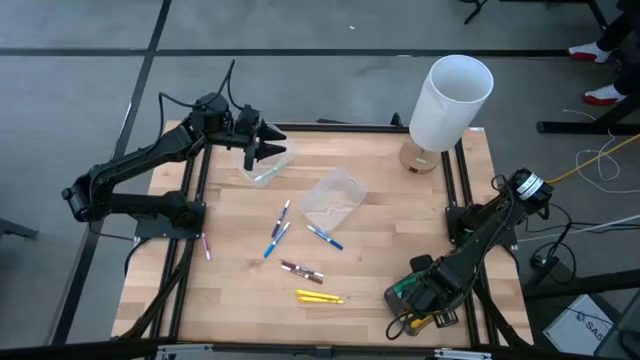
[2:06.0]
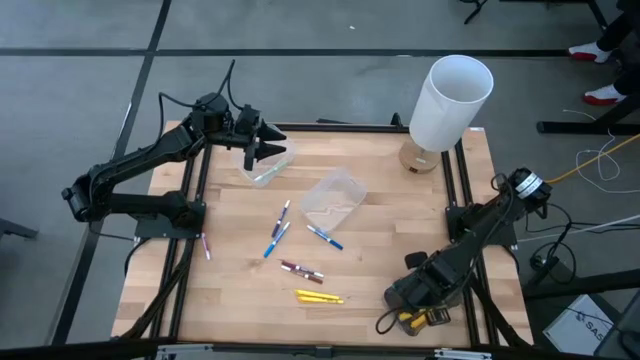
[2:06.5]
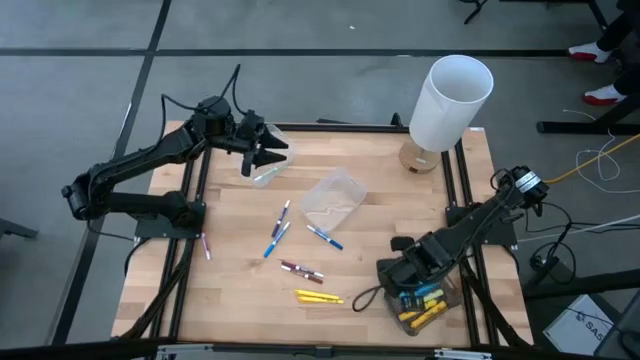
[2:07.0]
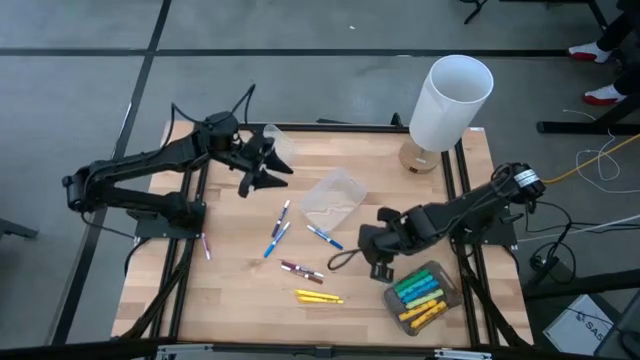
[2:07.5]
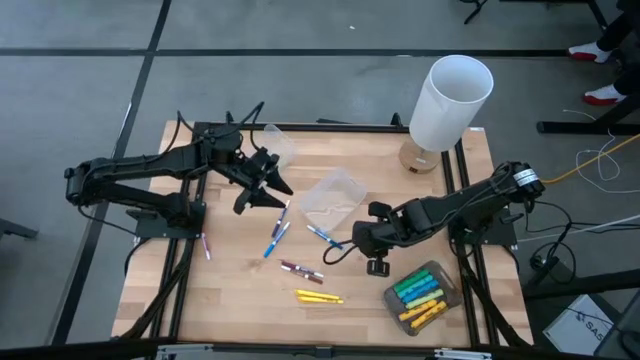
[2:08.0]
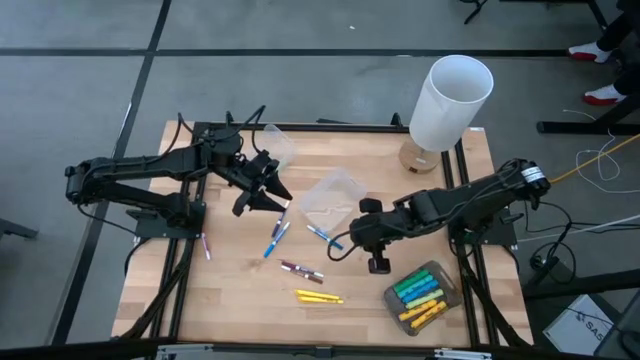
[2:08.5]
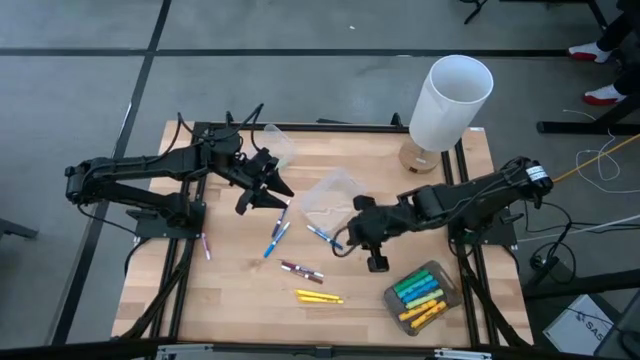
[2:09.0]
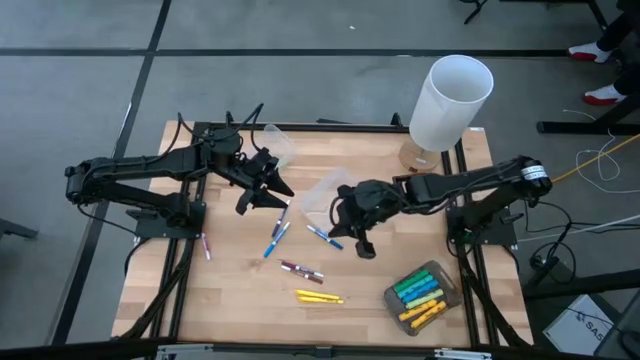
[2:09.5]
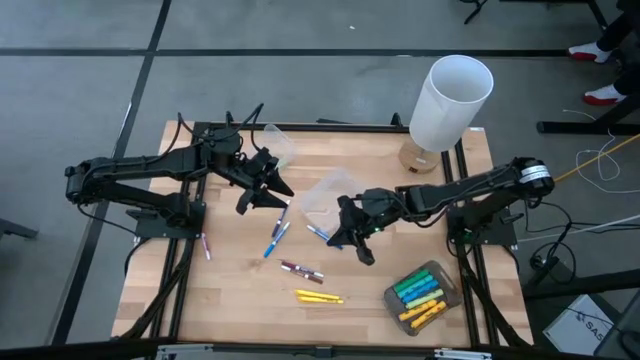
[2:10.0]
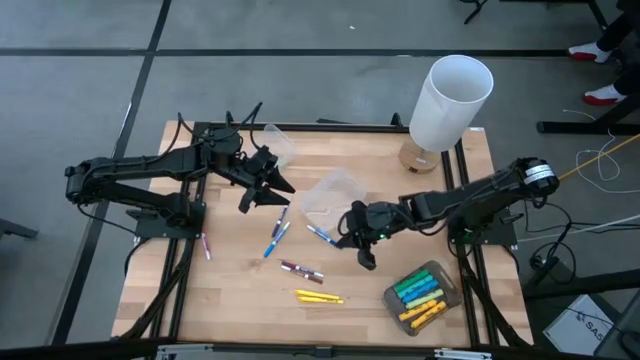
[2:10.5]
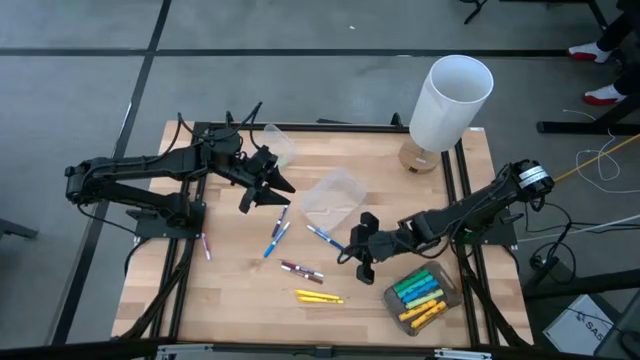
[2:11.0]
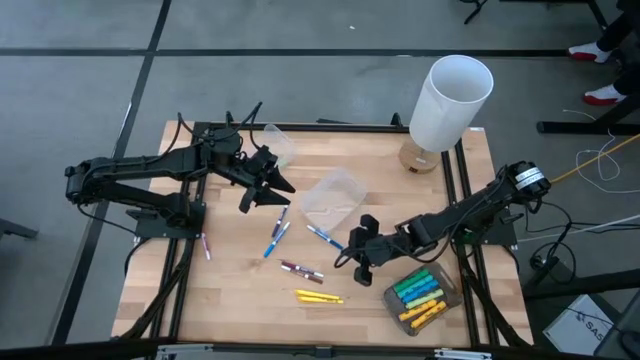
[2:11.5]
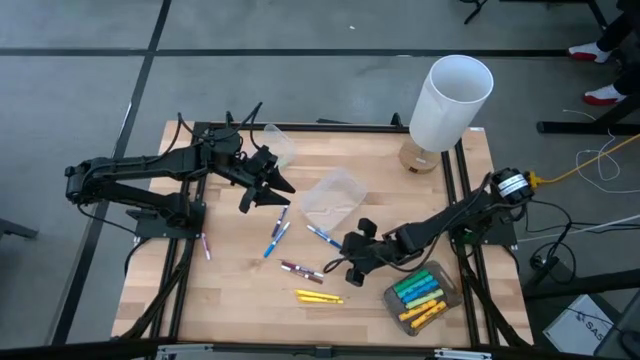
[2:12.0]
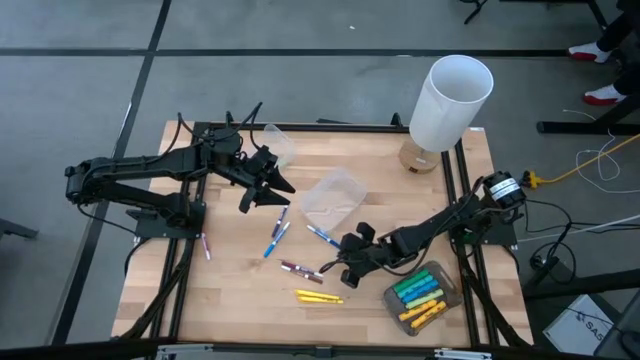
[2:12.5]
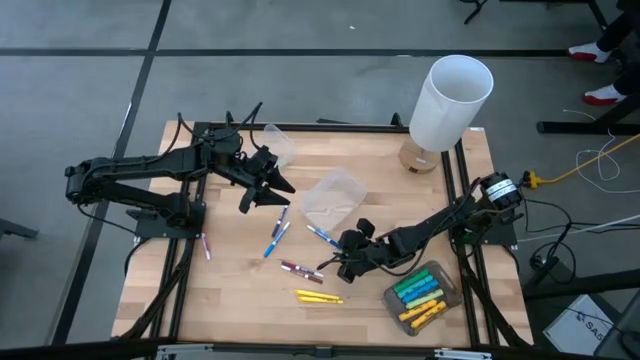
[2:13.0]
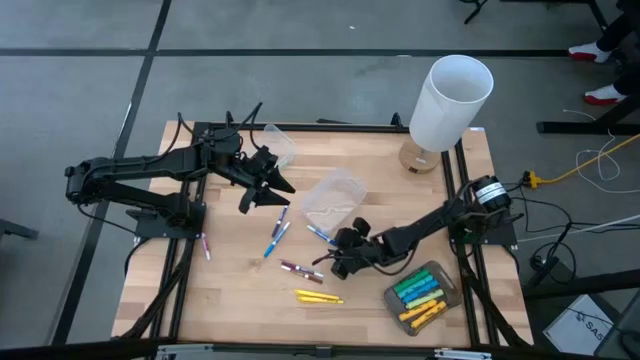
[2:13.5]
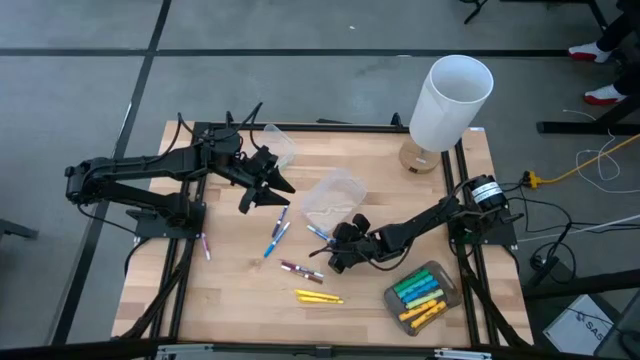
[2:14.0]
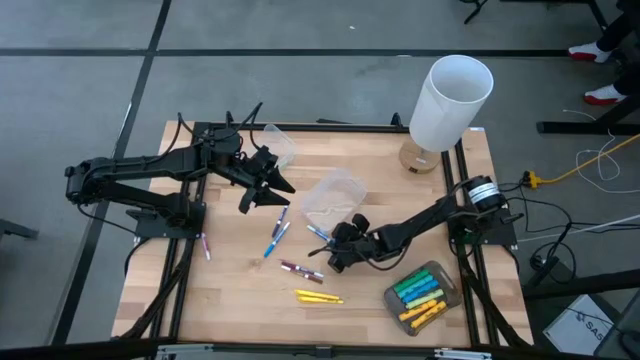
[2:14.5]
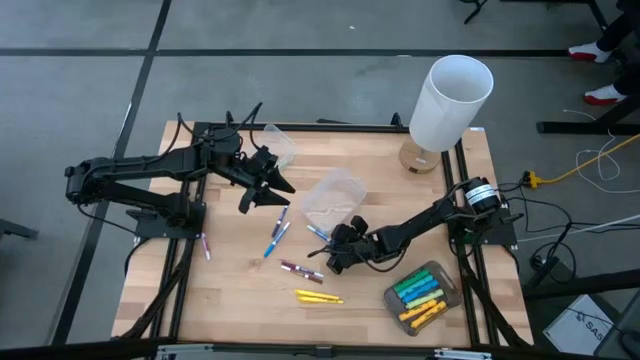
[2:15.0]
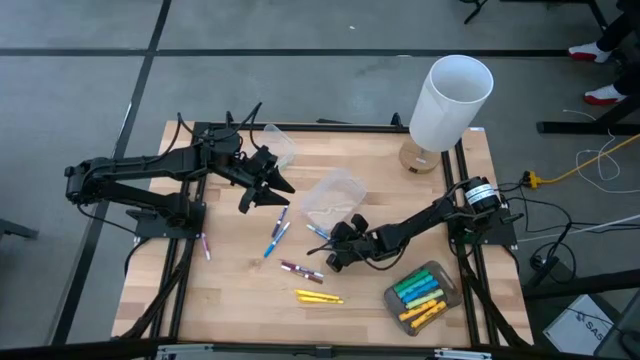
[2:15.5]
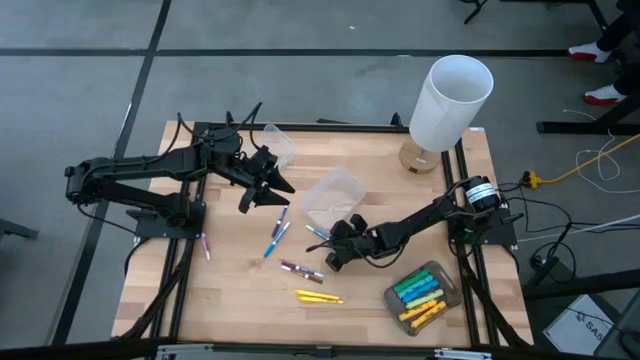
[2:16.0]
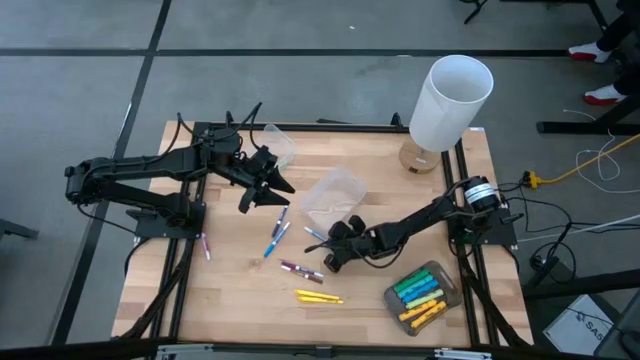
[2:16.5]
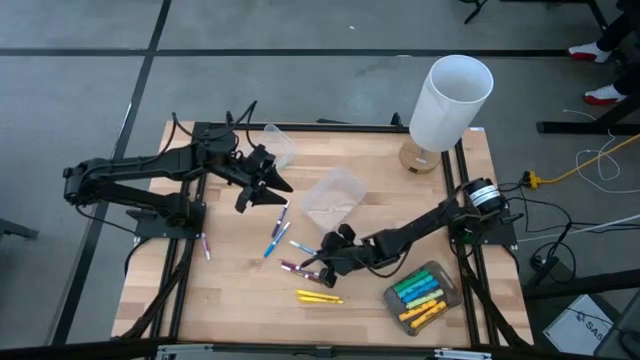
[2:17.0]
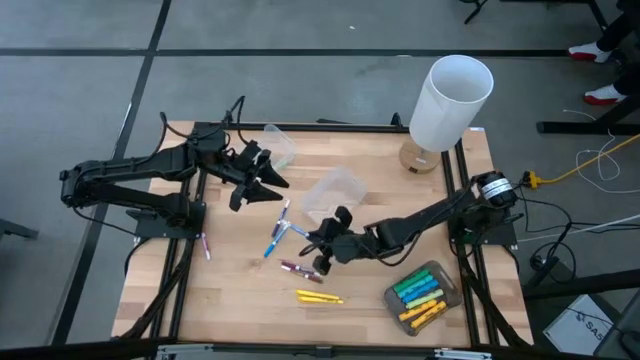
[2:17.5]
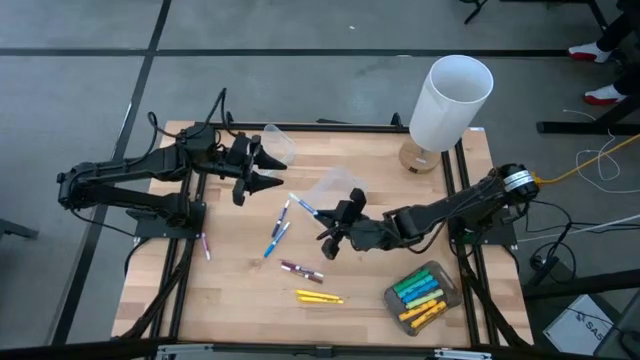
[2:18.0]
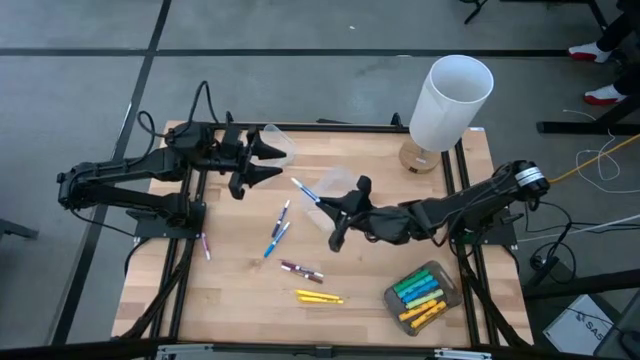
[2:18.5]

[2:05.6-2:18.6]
Task: Pick & Place Markers
Put the right blue marker into the transparent bin

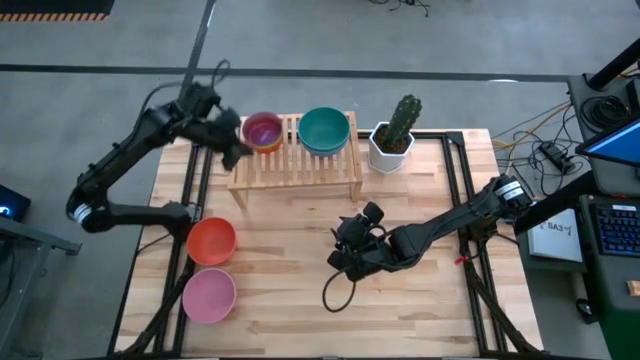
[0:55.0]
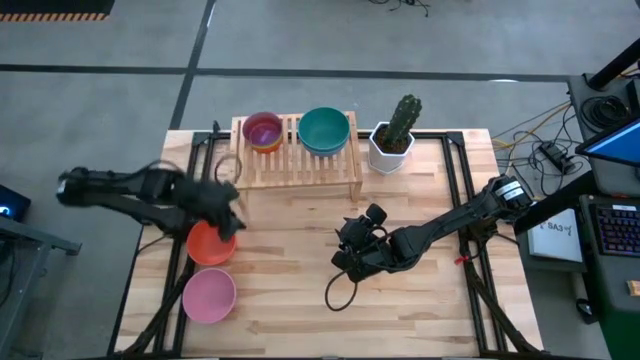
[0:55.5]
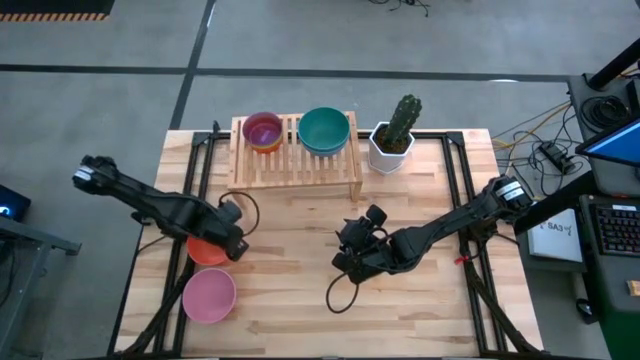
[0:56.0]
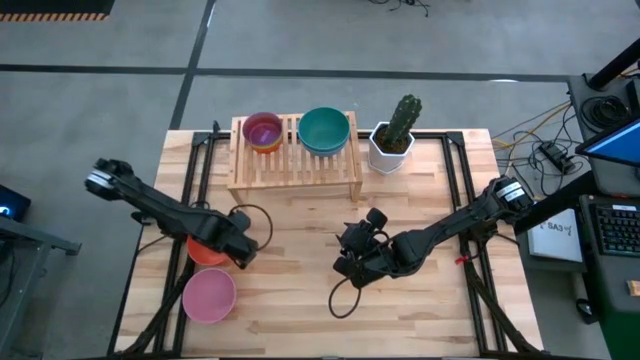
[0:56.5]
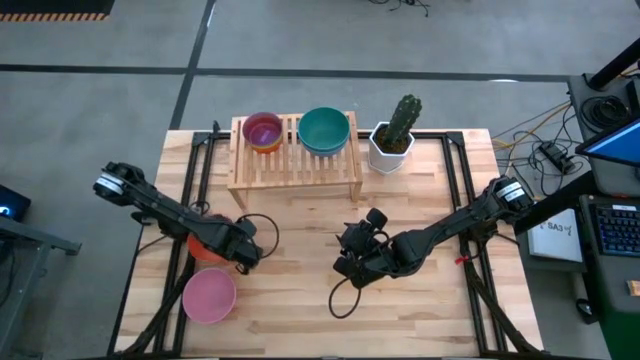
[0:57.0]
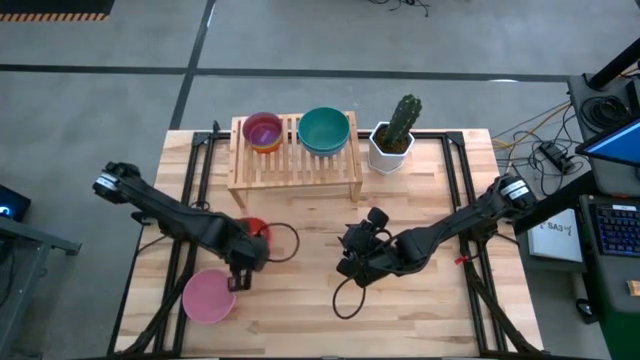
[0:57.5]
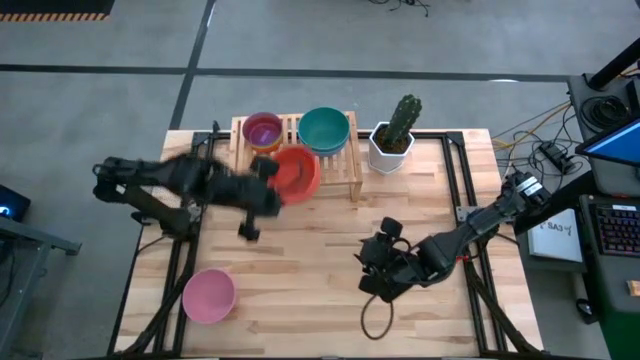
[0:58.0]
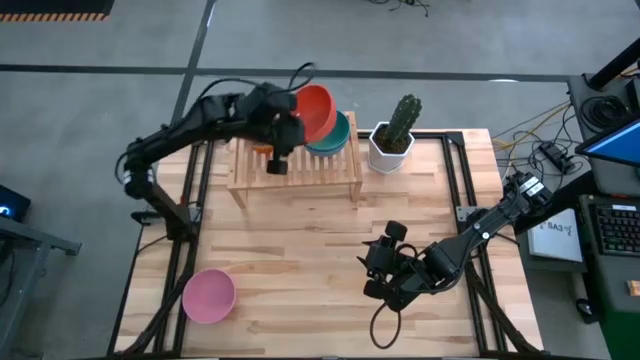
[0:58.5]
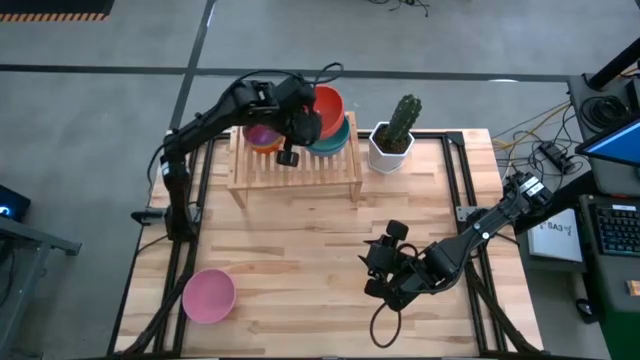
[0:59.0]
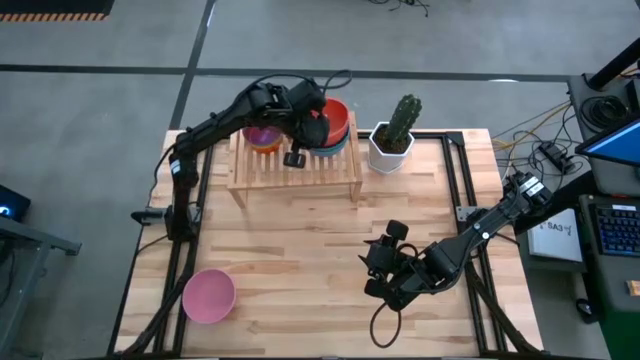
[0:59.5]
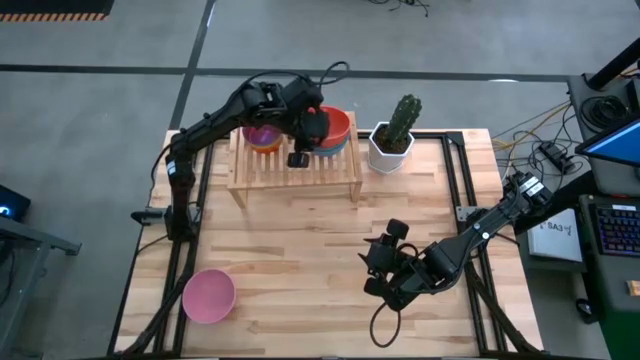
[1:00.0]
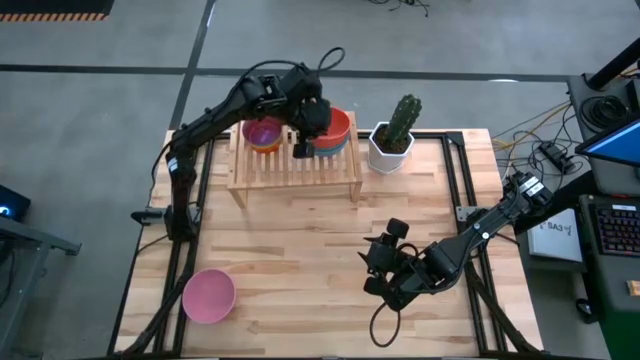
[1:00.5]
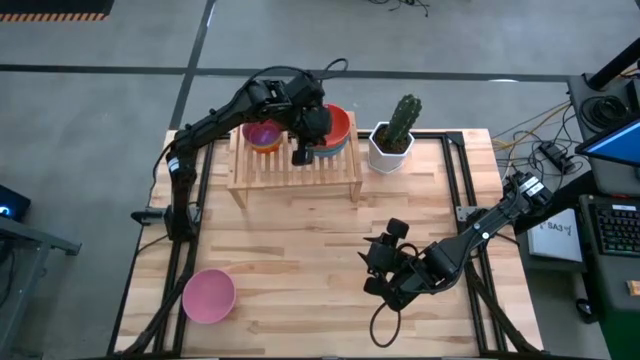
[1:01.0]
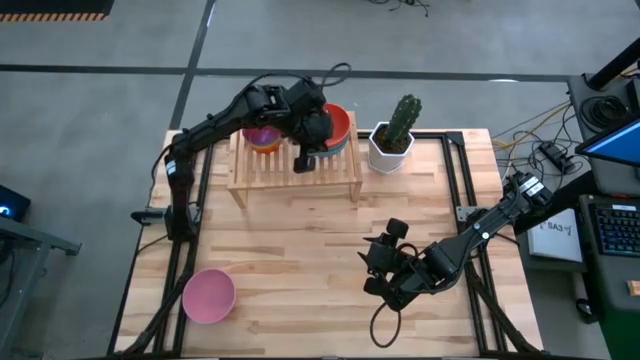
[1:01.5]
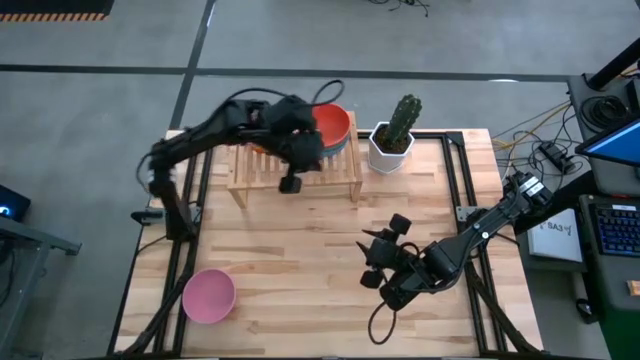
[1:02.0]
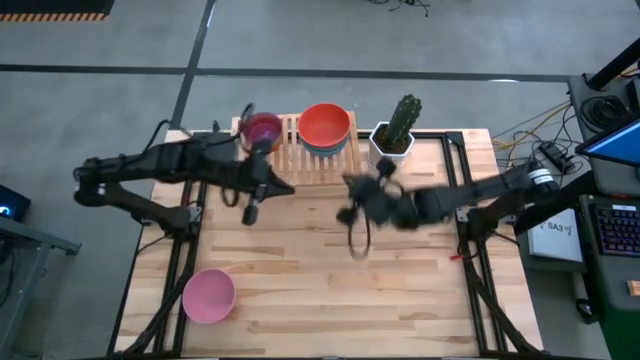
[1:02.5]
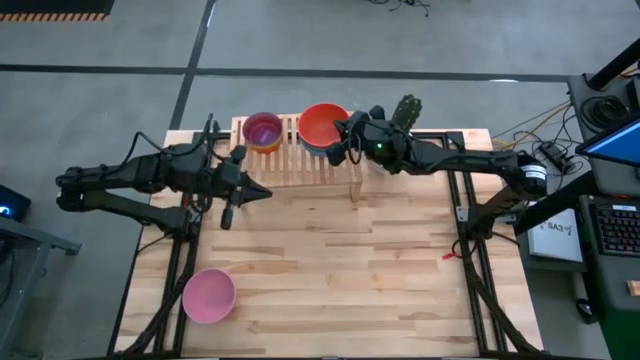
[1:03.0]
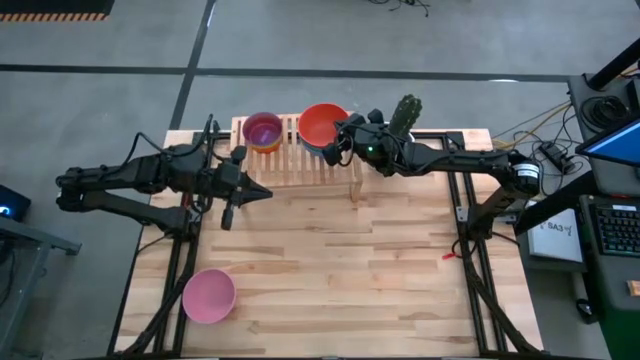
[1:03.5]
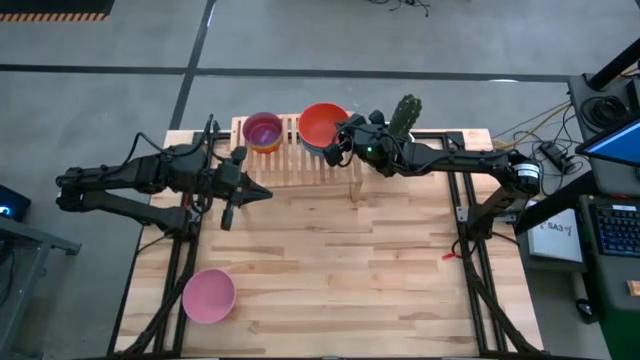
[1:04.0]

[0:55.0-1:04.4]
Task: Place and stack bowls onto a shelf
Stack the orange bowl on top of the green bowl on the shelf
